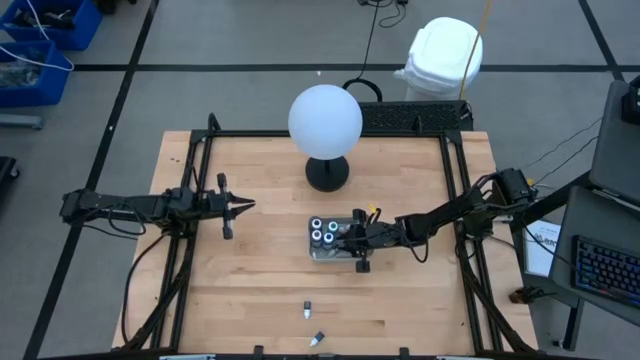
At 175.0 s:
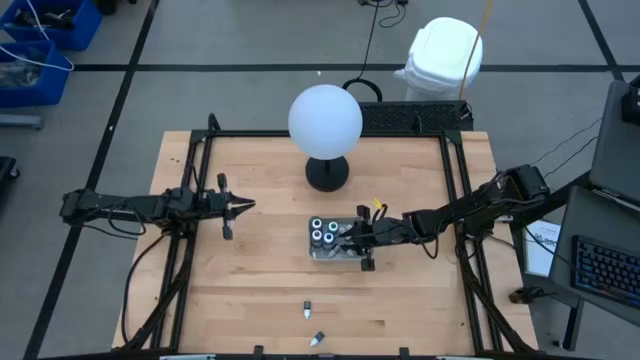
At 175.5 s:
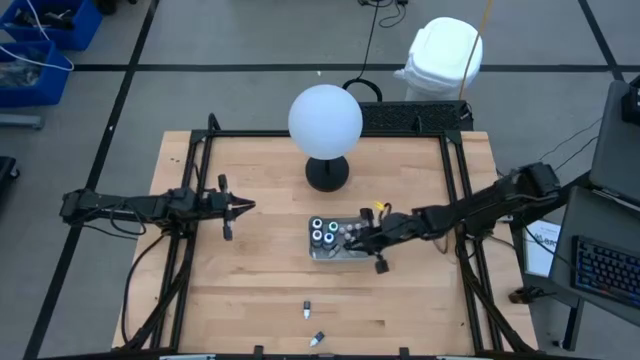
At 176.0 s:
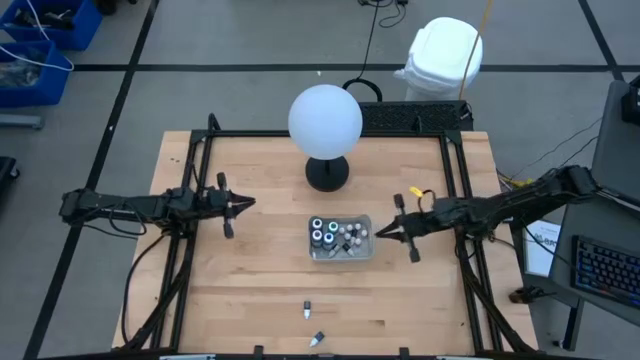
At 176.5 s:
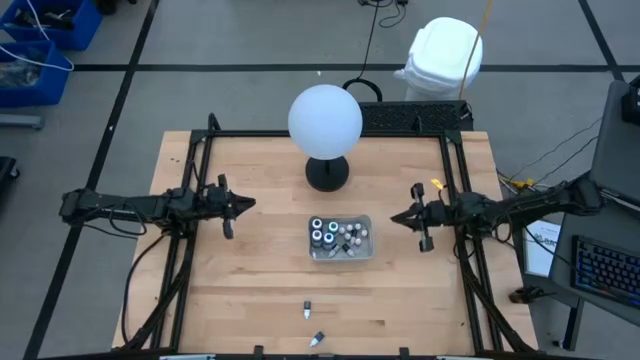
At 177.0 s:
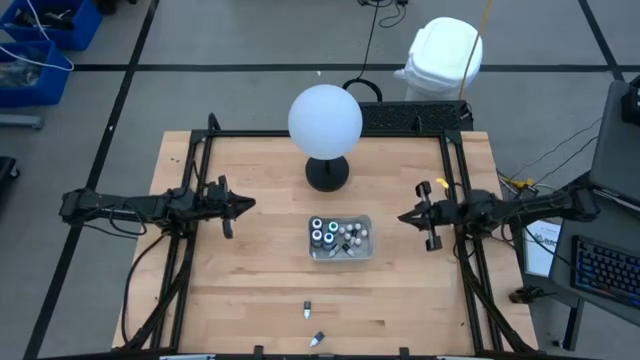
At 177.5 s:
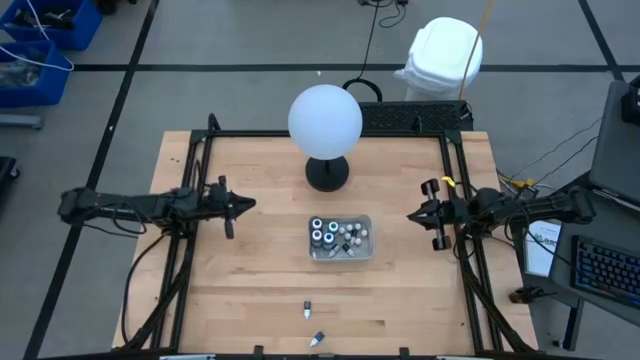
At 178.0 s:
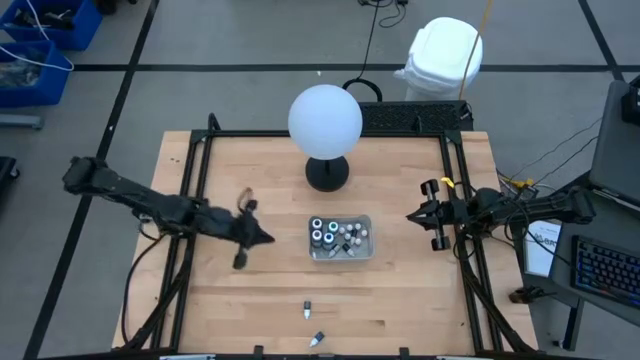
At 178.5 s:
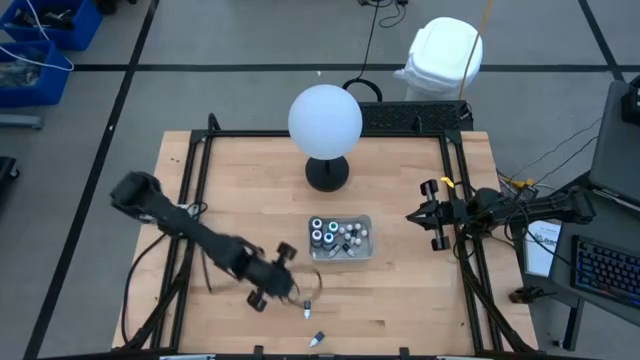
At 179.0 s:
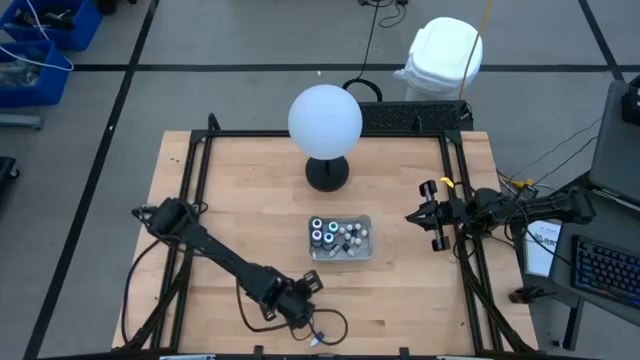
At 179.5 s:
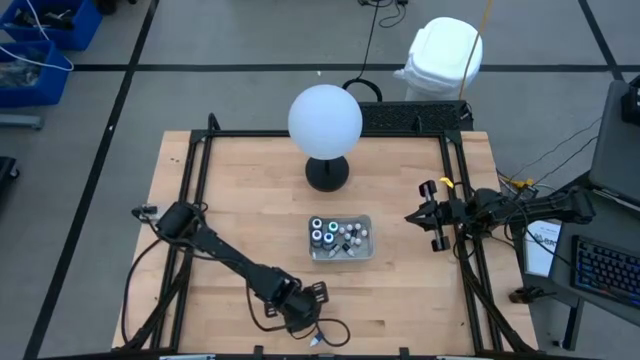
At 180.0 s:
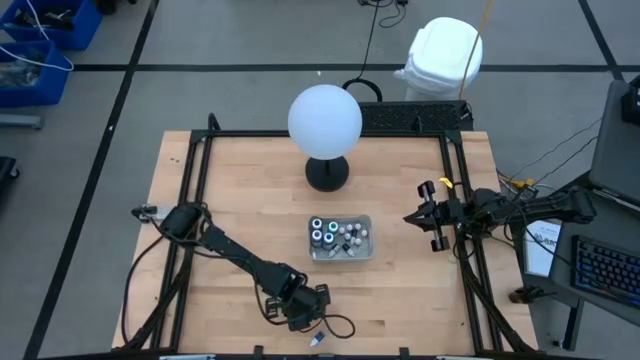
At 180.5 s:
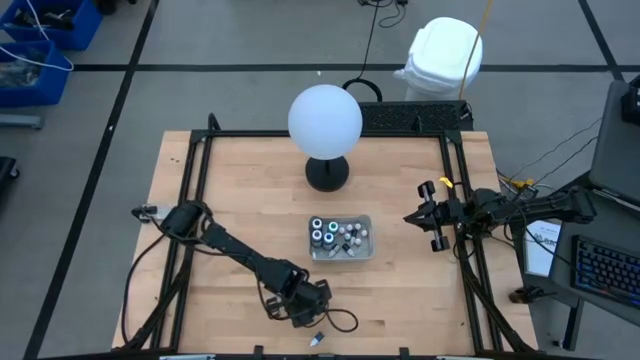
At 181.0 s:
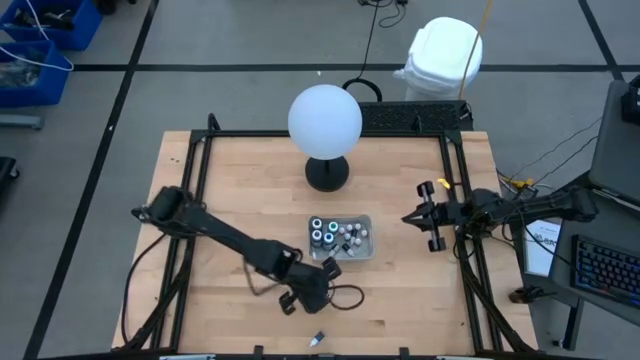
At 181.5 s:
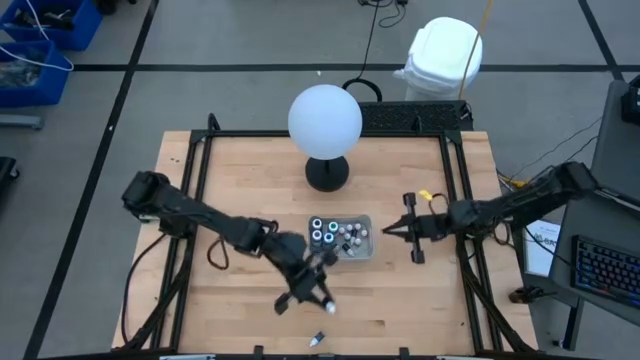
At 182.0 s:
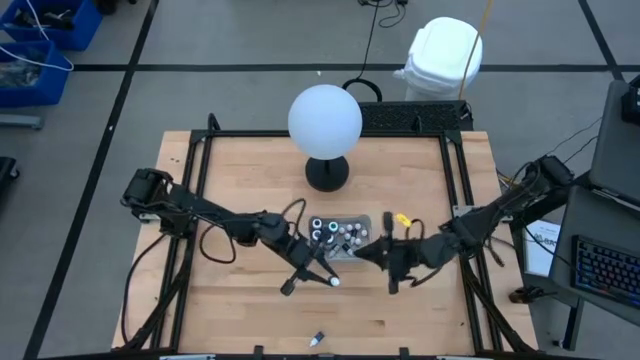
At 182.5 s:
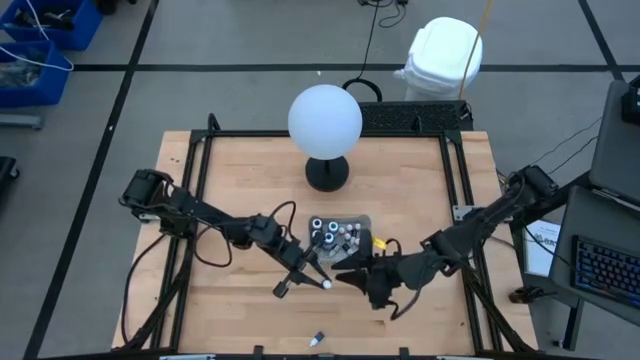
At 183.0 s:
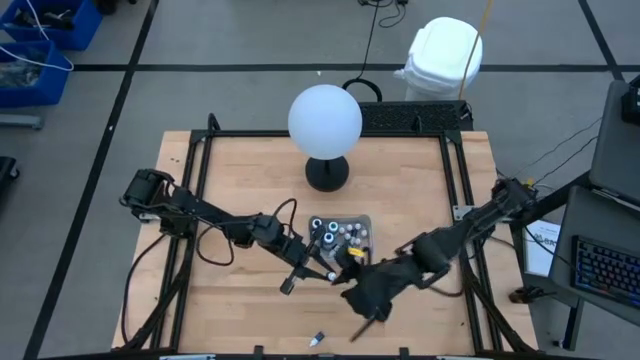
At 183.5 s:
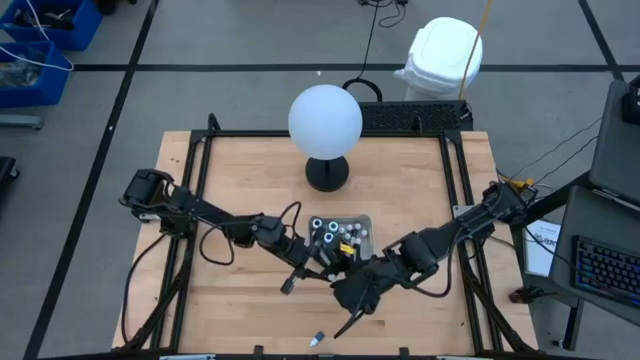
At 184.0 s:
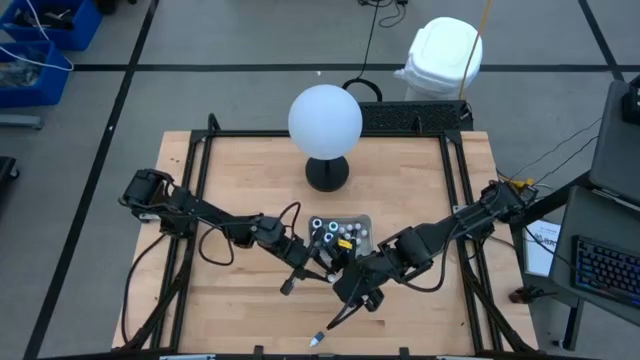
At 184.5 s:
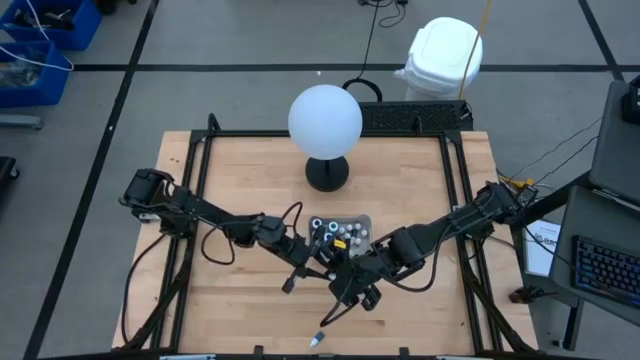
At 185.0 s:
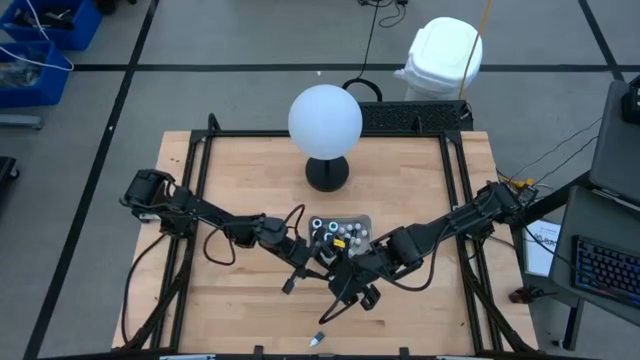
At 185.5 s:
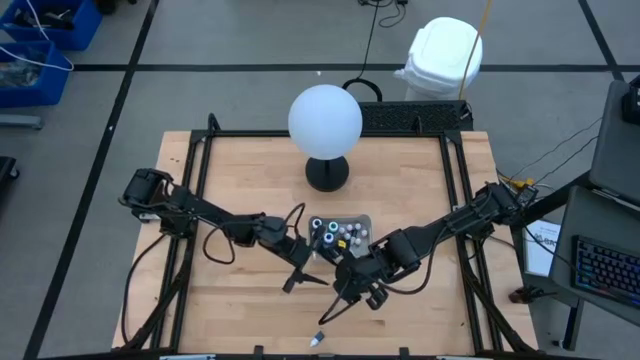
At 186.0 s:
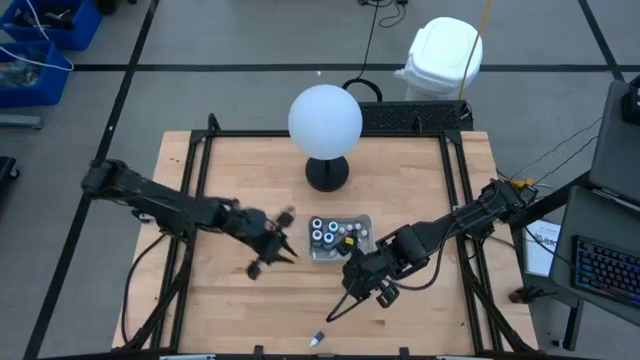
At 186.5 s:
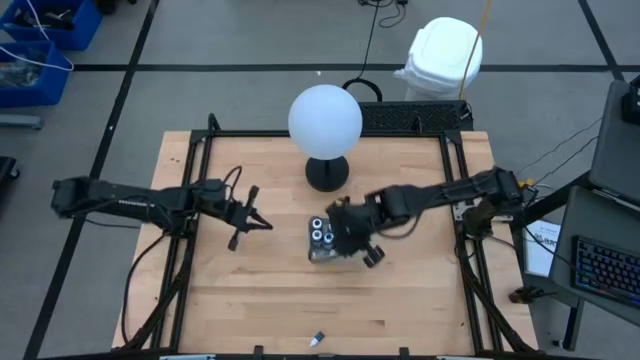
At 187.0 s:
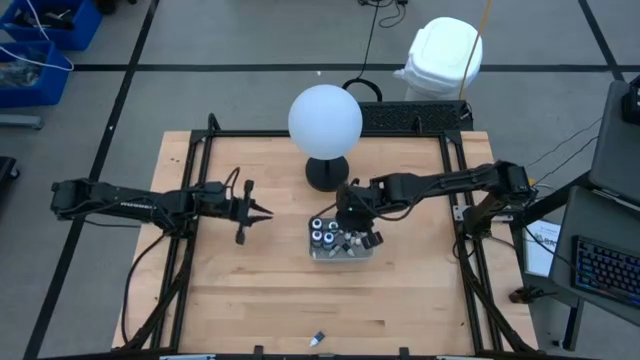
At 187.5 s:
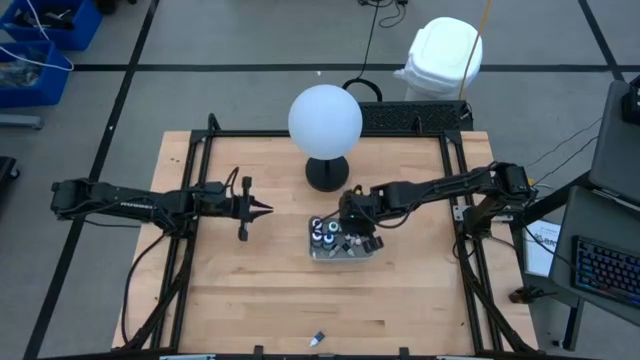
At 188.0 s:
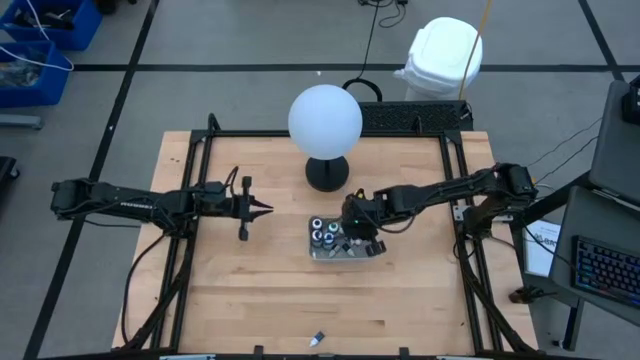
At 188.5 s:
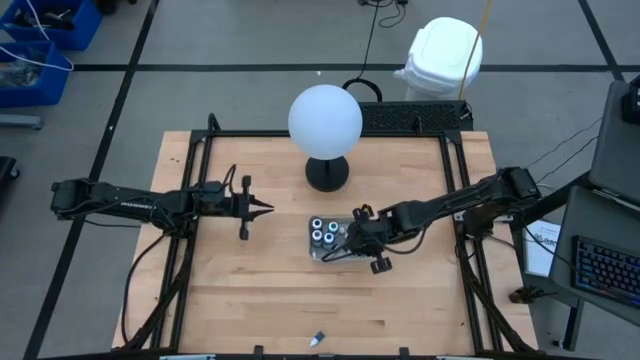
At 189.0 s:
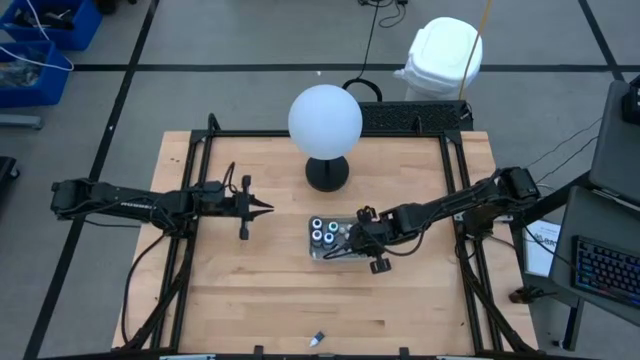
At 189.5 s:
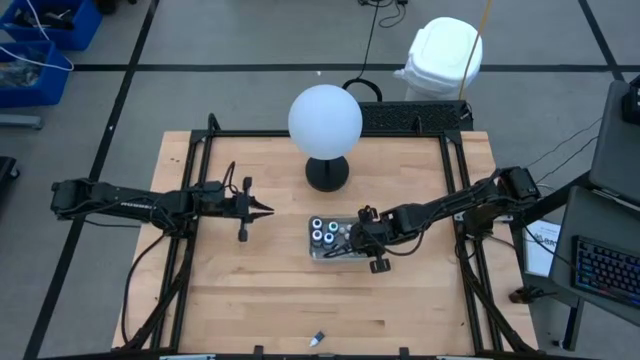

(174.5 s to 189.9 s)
Task: Pick & Place food coloring
Put the small black food coloring bottle into the gray bin

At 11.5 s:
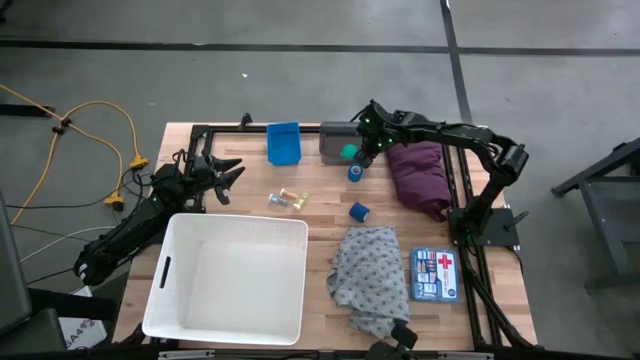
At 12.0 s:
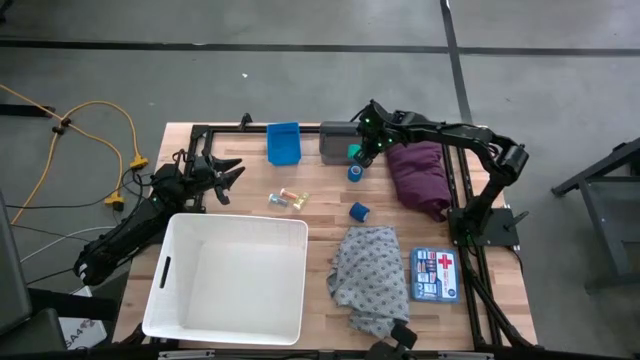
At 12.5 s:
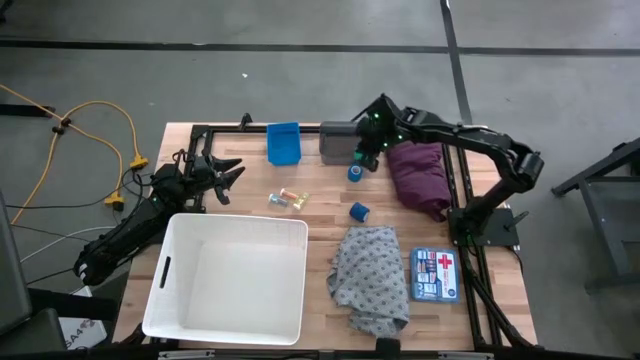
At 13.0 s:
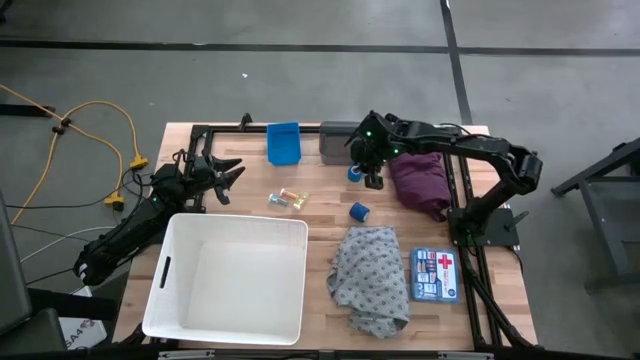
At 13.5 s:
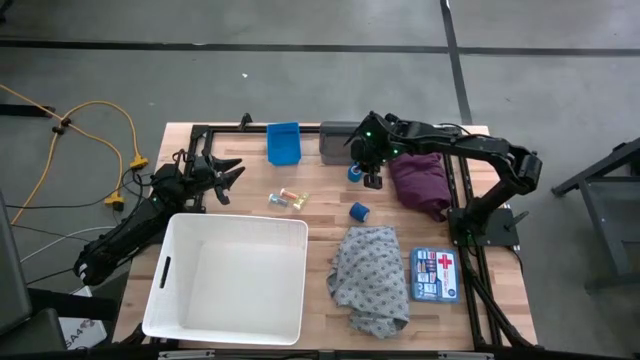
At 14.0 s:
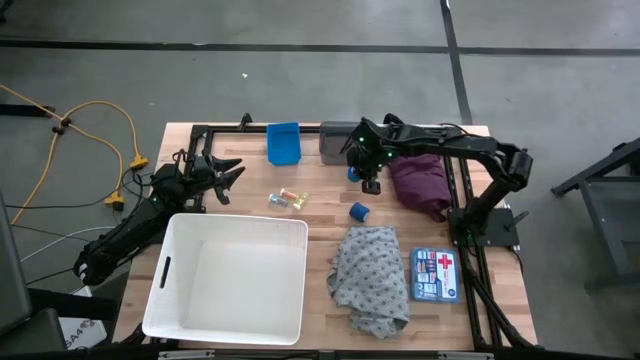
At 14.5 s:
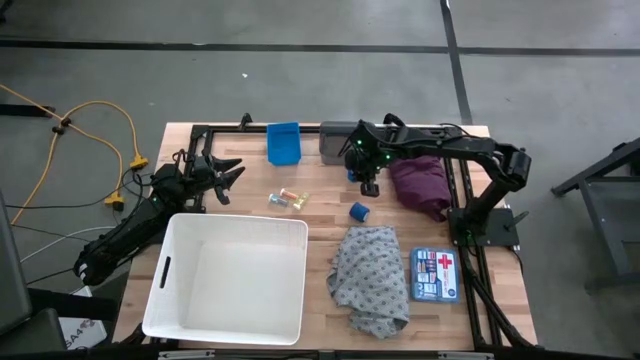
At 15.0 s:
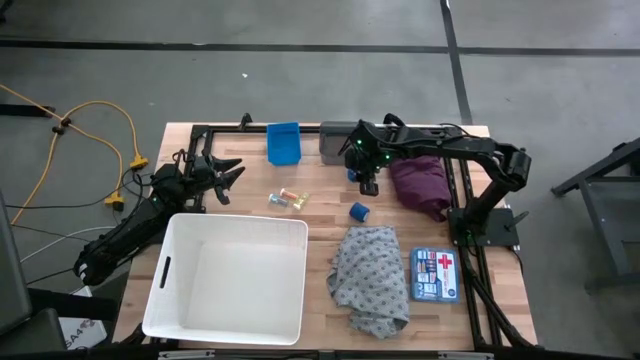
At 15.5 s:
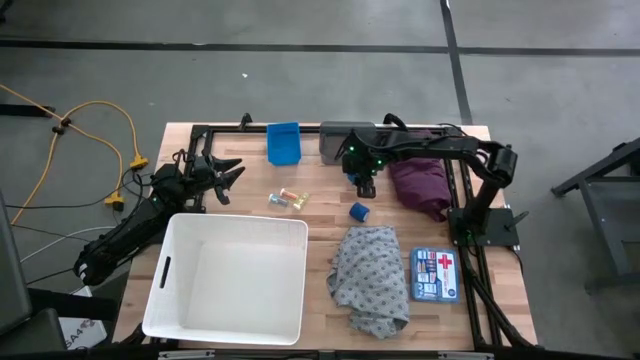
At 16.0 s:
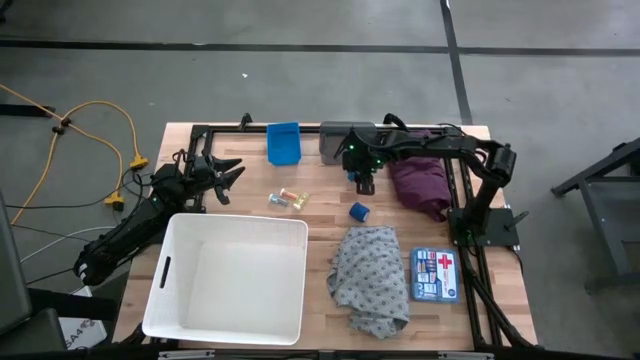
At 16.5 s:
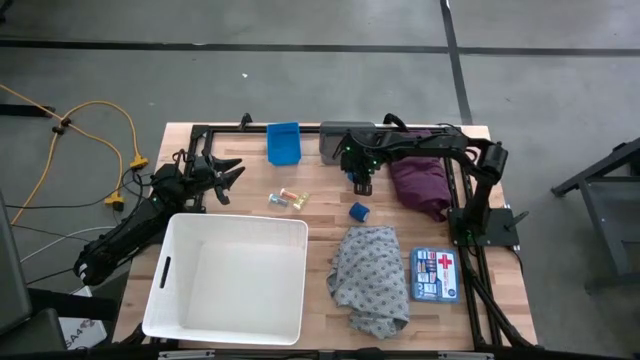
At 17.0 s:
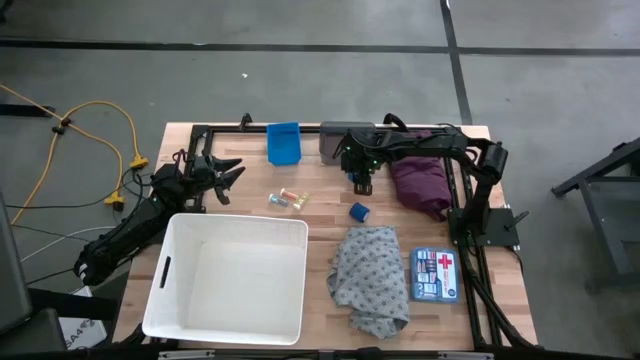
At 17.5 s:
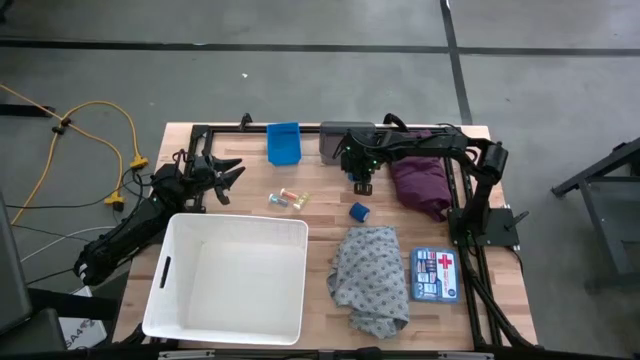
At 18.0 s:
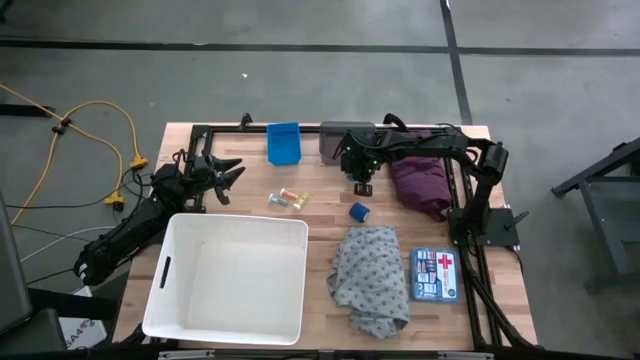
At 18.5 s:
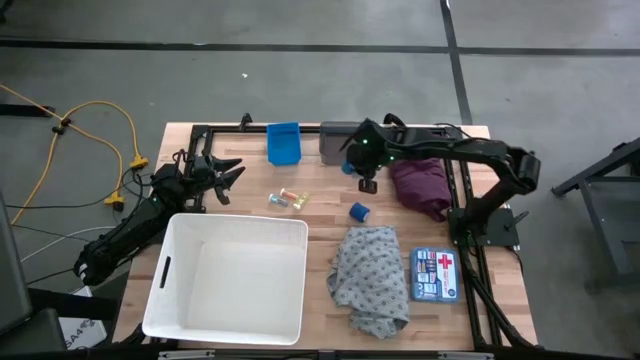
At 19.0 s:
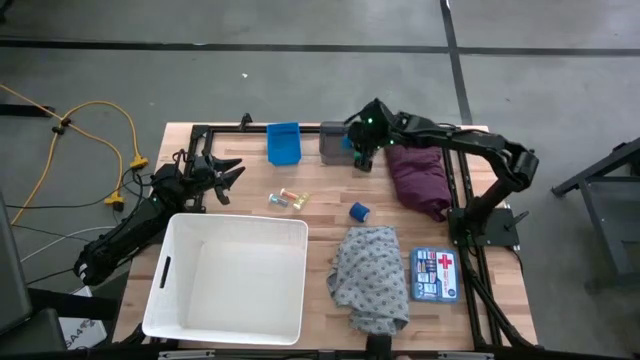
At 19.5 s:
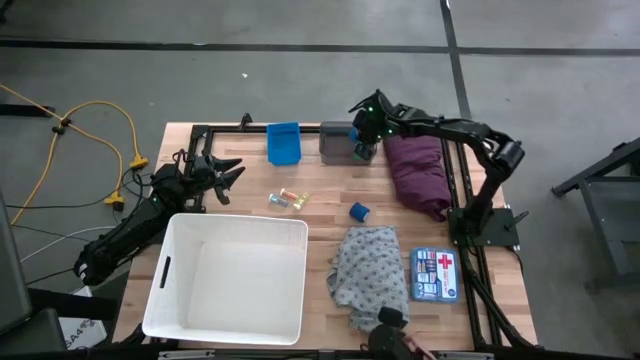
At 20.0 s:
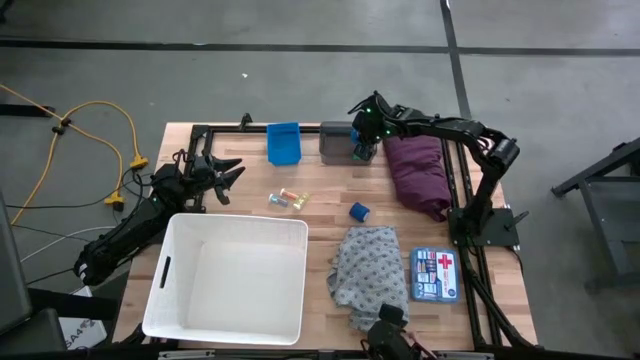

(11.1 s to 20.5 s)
Task: Pick & place medical supplies in basket/bin
Put the top blue bandage into the black bin
